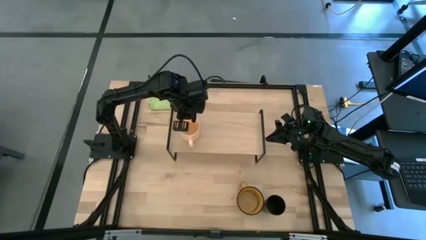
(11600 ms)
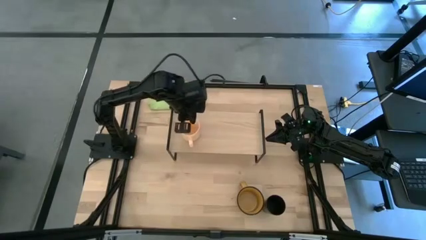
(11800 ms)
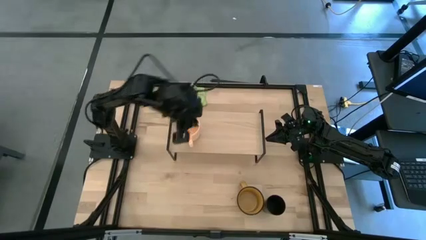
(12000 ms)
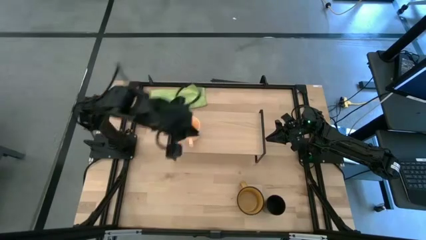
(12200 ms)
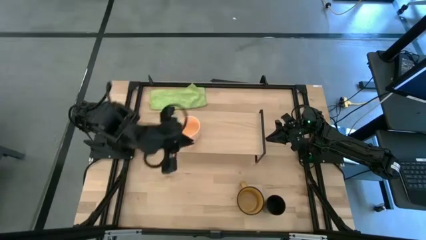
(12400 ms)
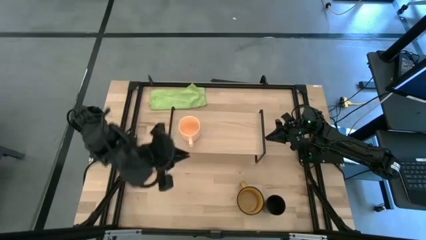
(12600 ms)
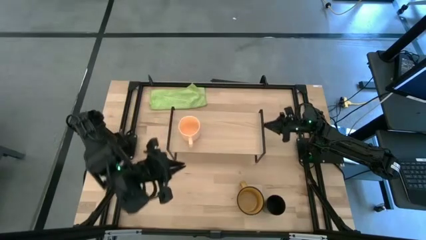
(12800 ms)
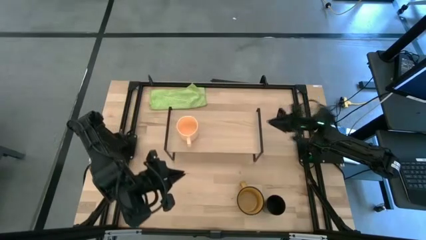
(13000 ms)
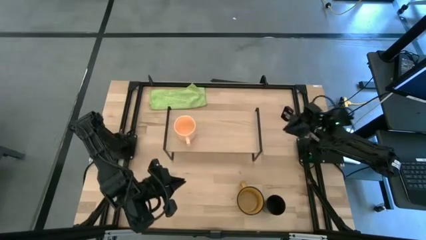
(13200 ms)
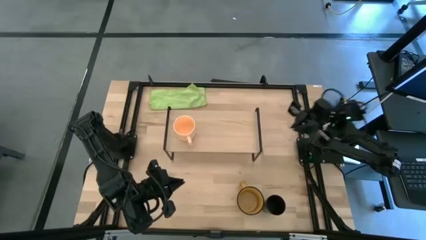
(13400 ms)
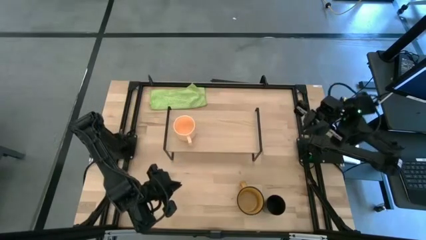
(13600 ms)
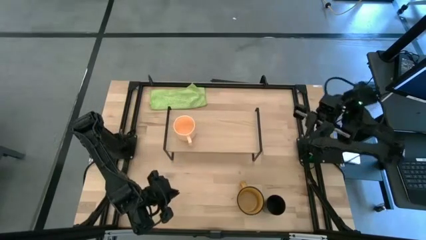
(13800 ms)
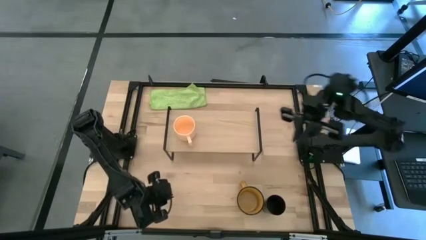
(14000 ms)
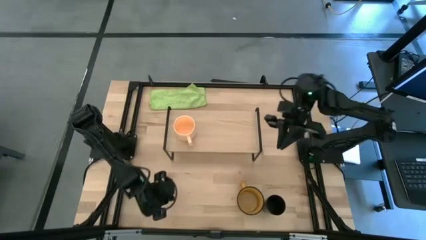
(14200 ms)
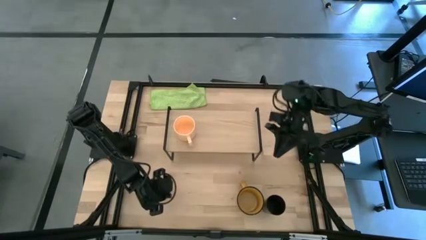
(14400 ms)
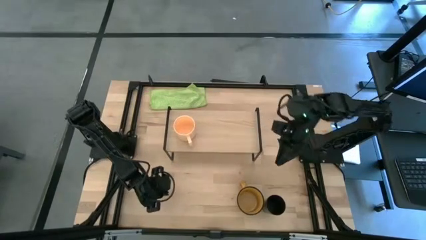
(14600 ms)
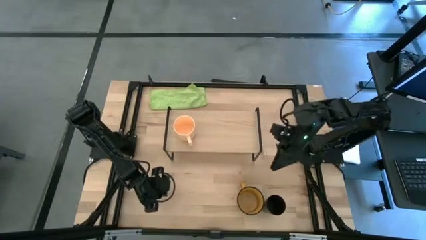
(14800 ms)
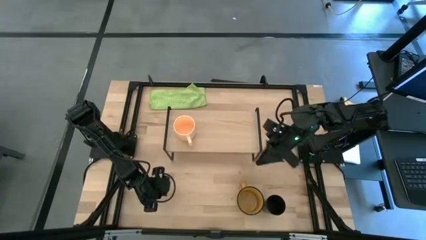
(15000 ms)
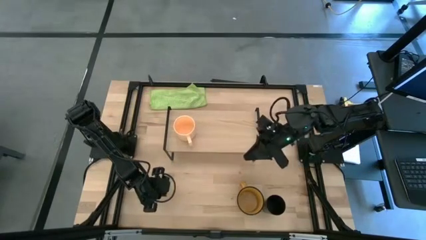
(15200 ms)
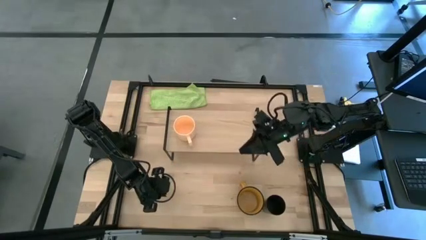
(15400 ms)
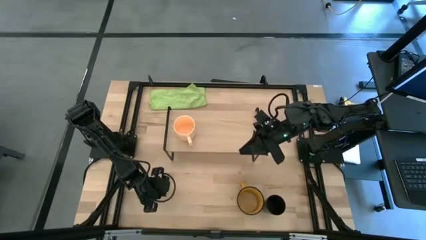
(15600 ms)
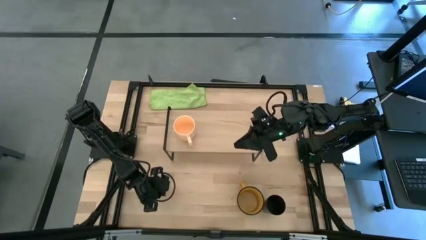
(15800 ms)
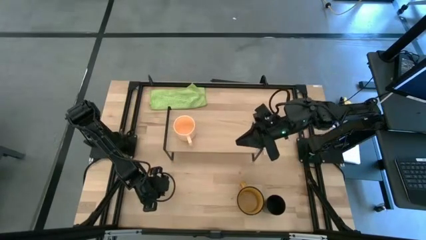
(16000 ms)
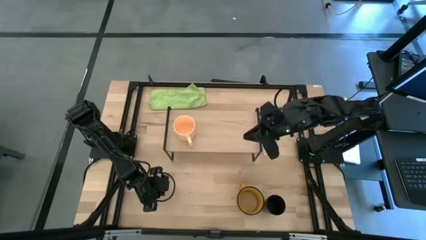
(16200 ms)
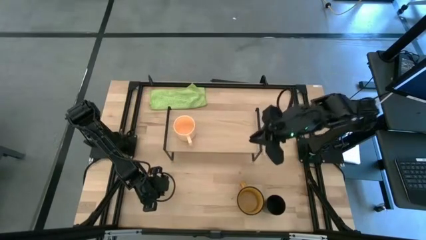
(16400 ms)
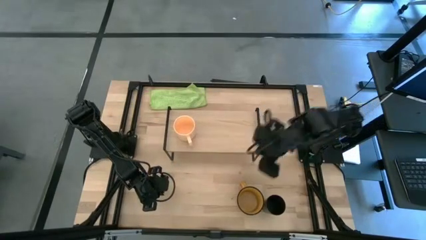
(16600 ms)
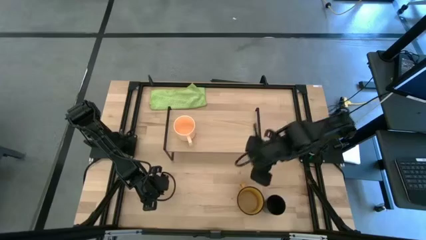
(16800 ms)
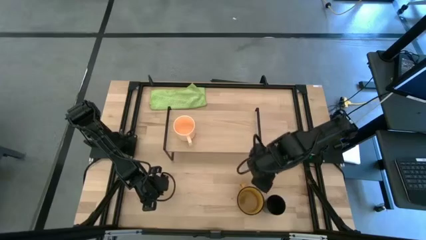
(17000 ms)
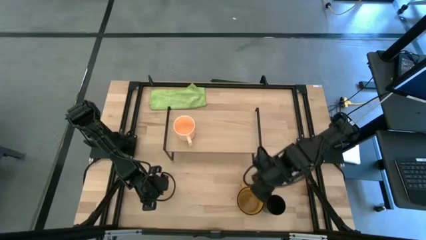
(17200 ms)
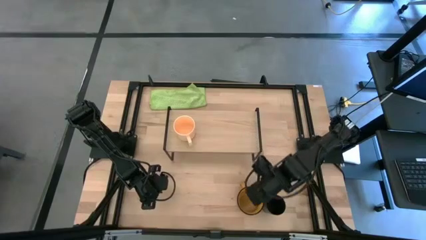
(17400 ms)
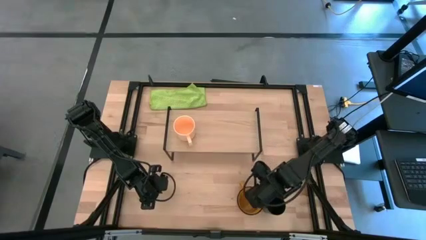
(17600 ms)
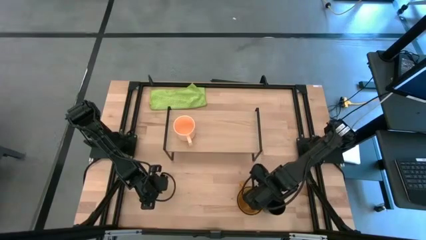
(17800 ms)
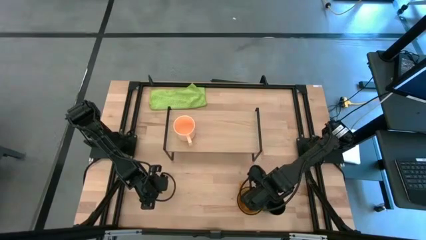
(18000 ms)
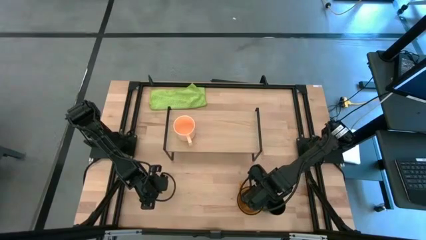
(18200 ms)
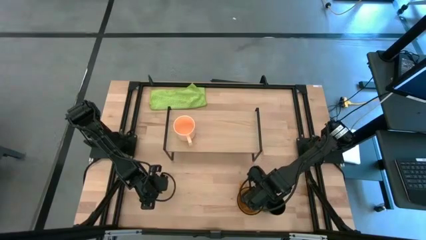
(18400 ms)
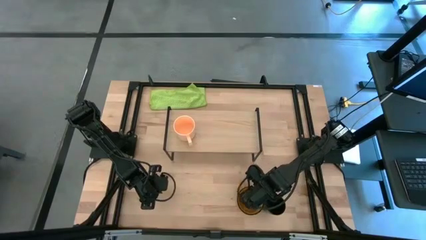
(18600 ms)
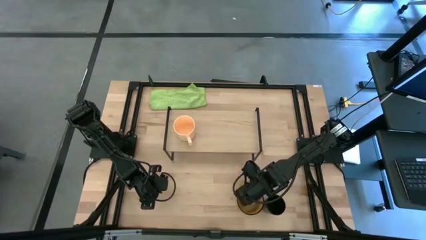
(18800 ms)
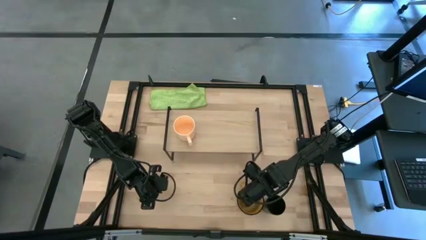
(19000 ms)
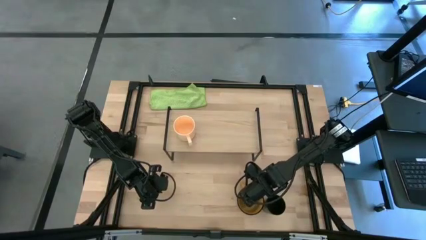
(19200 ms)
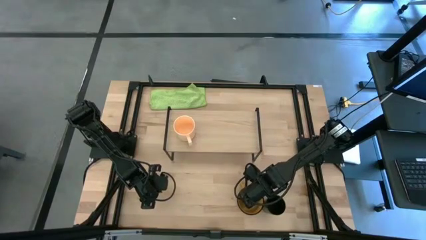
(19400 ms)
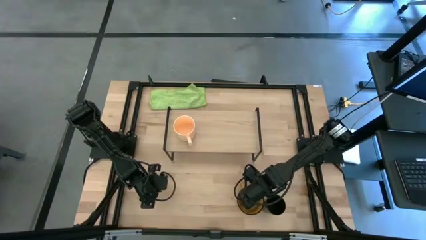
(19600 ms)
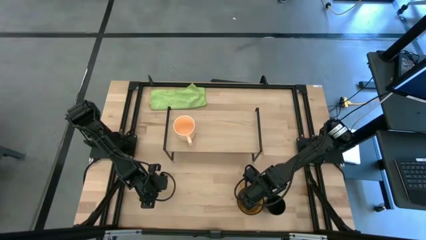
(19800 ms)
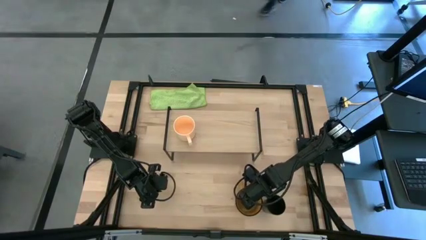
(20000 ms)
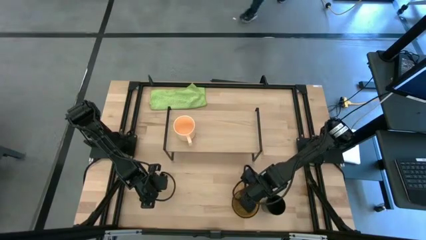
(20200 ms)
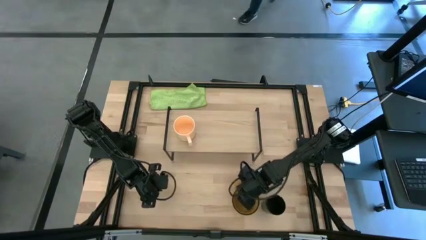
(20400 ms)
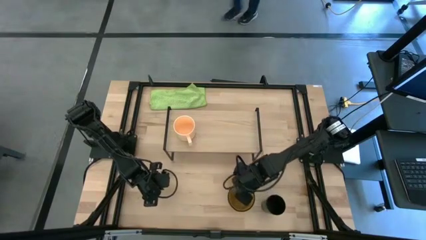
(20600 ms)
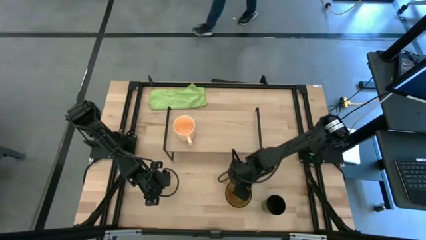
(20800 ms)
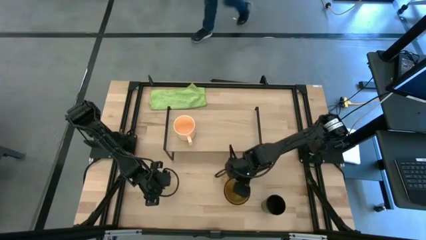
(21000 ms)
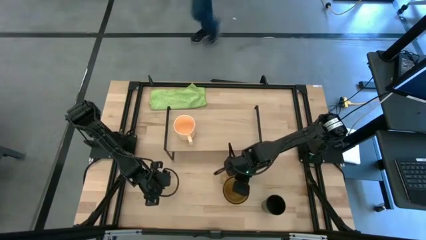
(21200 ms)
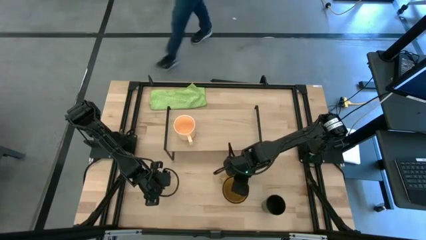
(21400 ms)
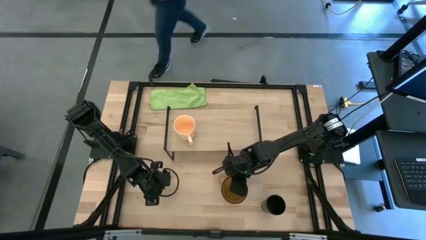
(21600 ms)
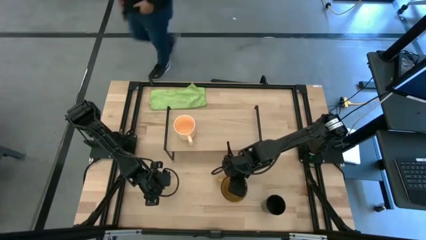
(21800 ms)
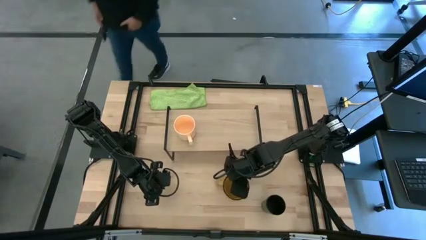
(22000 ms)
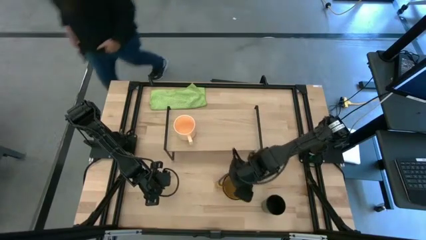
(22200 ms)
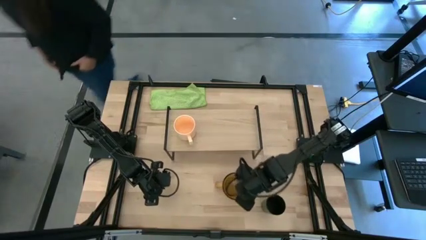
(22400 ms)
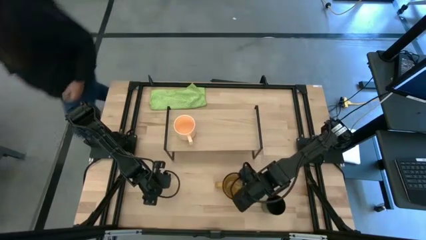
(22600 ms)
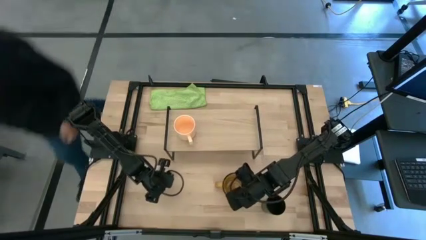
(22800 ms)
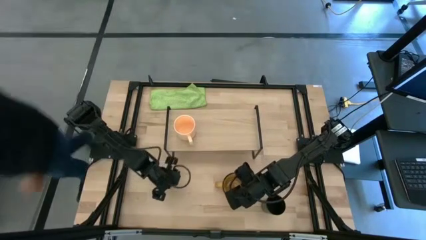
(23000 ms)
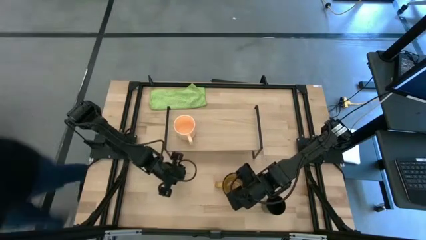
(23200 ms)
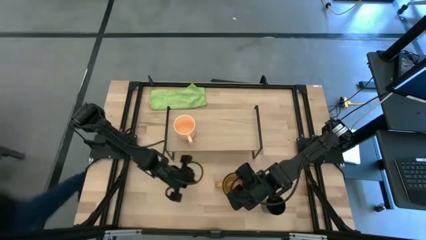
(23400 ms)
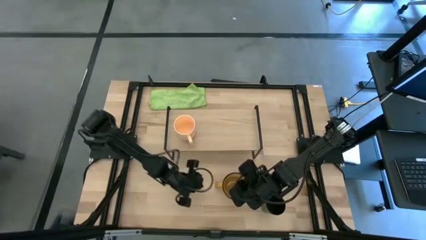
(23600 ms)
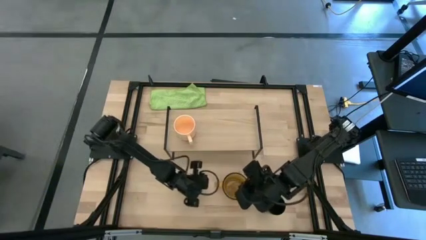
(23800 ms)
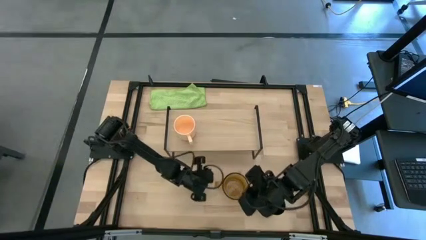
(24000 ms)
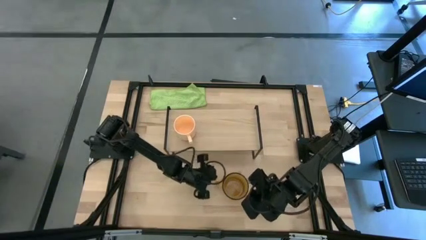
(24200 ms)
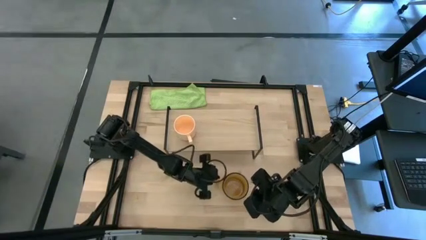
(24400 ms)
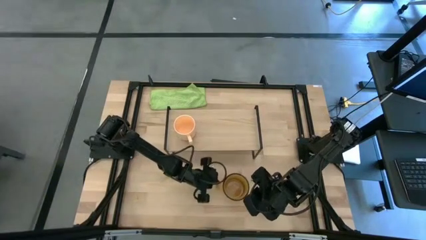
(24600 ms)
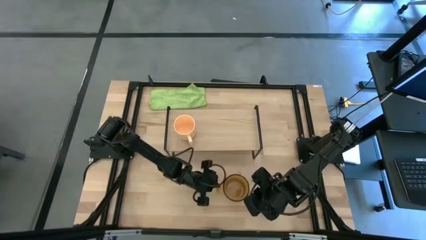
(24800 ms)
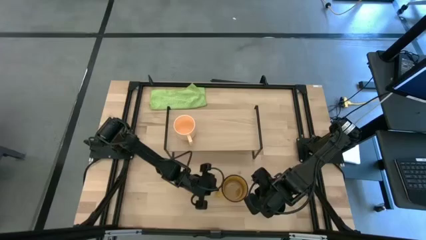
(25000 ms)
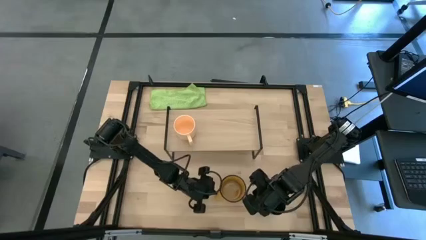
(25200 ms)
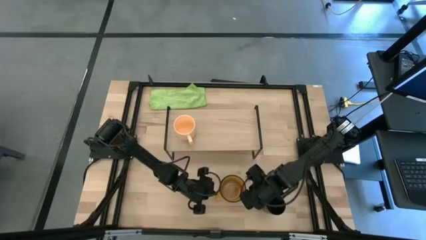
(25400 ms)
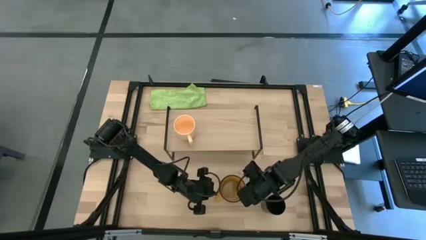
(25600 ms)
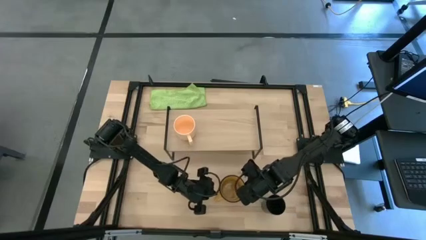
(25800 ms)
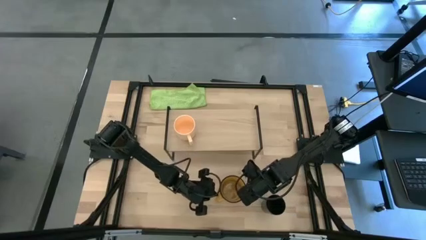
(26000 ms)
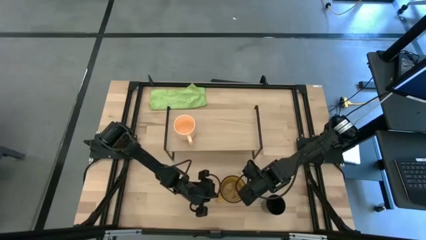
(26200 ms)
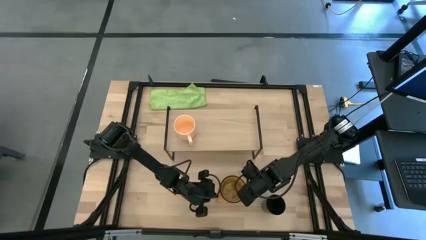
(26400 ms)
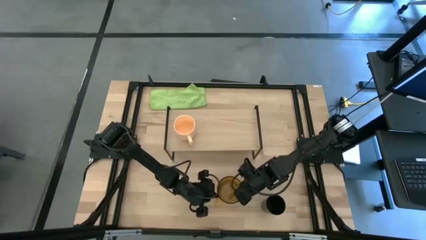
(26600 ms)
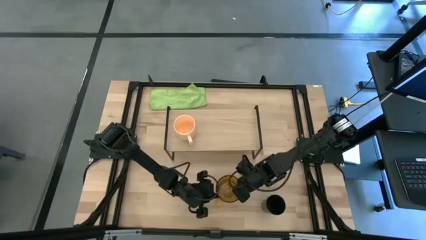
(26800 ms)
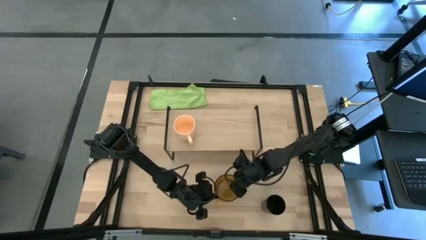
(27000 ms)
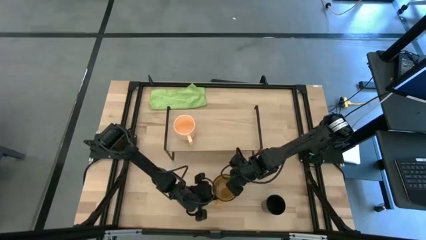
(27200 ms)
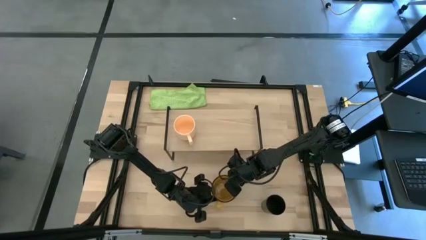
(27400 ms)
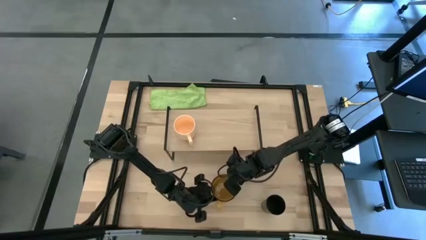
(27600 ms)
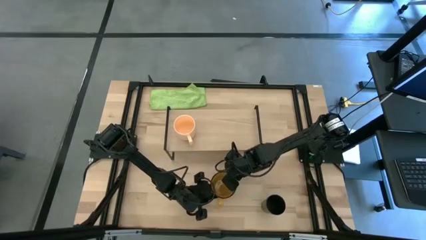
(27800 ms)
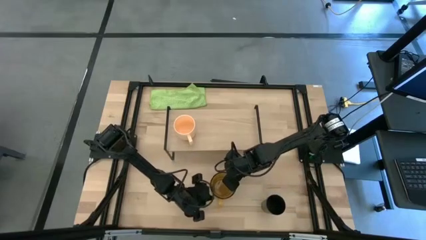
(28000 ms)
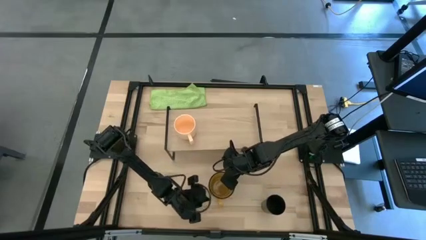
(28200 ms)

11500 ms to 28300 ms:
Task: Stack small to large cups/mugs on shelf
Adjust the yellow mug
